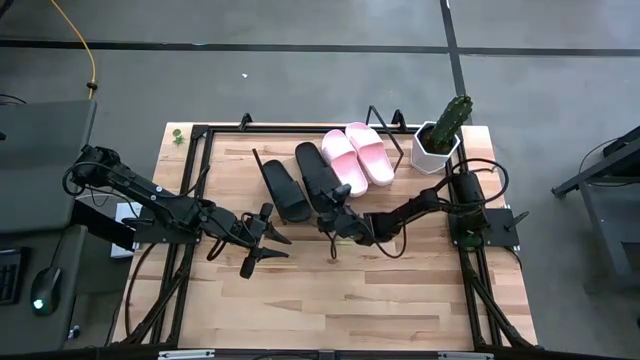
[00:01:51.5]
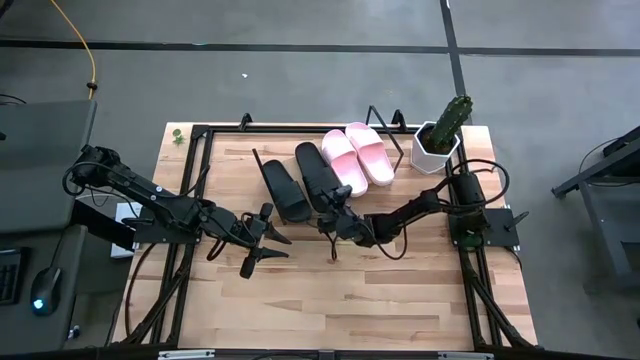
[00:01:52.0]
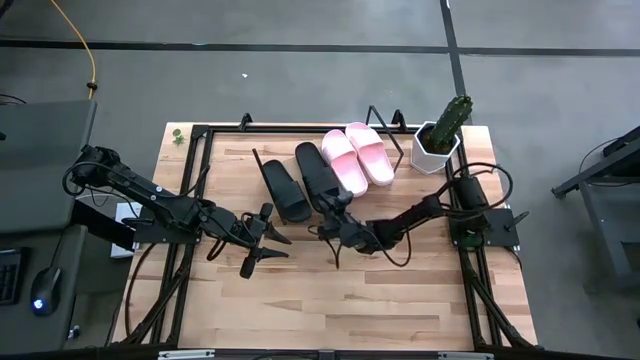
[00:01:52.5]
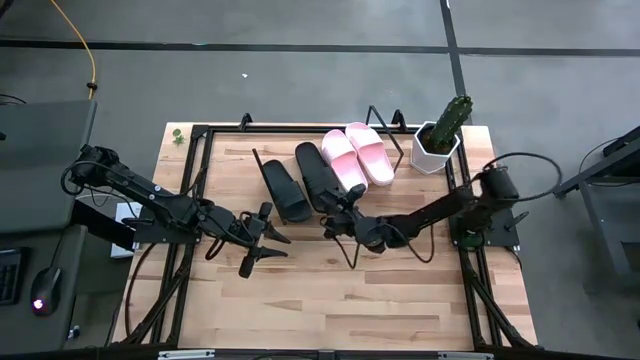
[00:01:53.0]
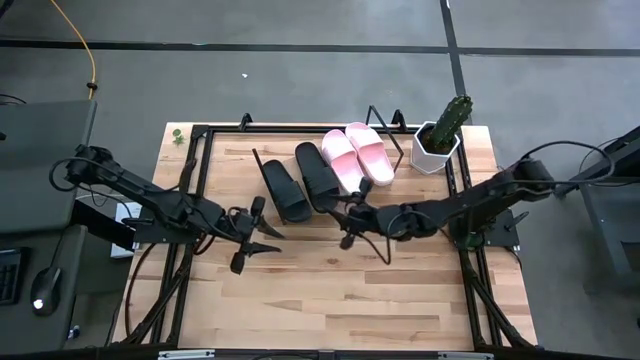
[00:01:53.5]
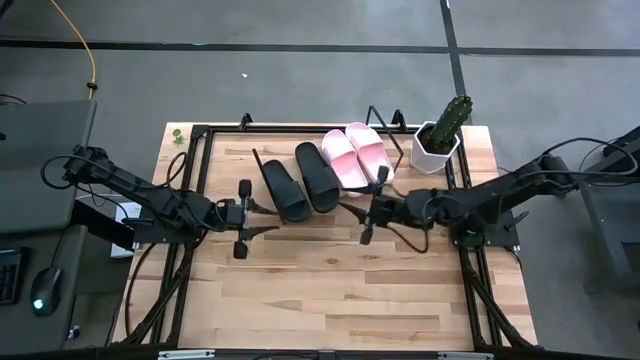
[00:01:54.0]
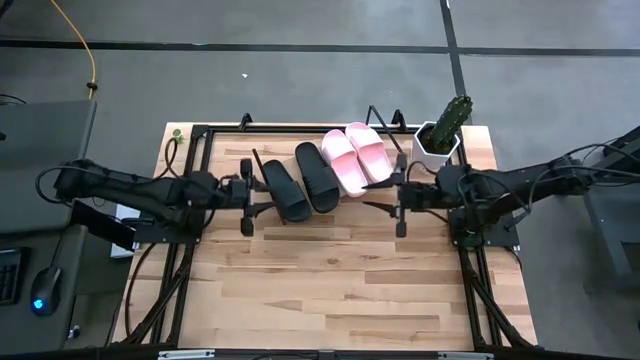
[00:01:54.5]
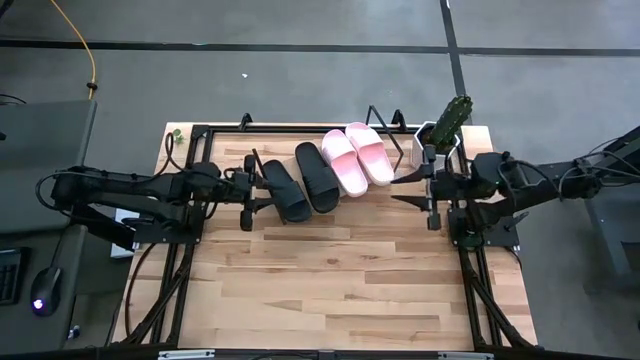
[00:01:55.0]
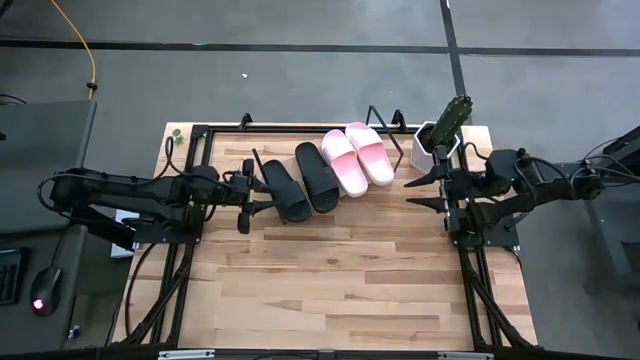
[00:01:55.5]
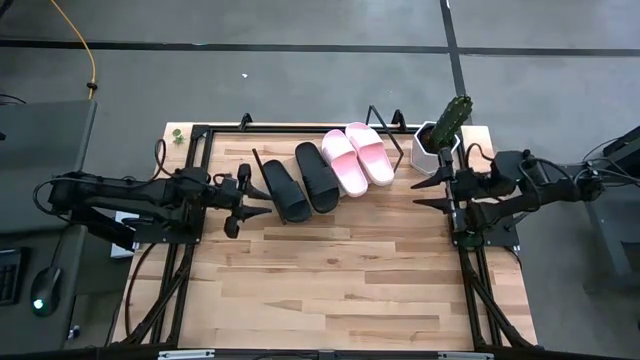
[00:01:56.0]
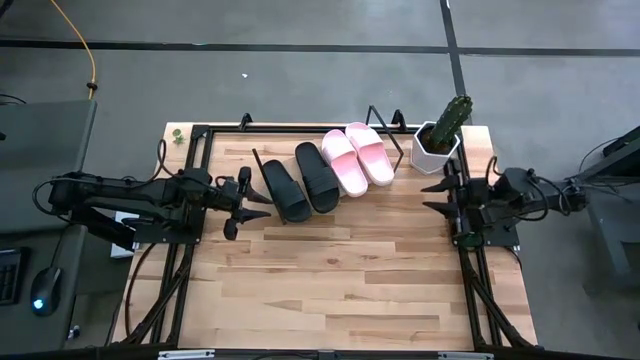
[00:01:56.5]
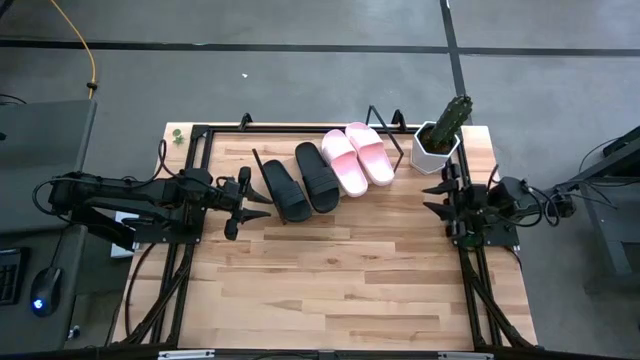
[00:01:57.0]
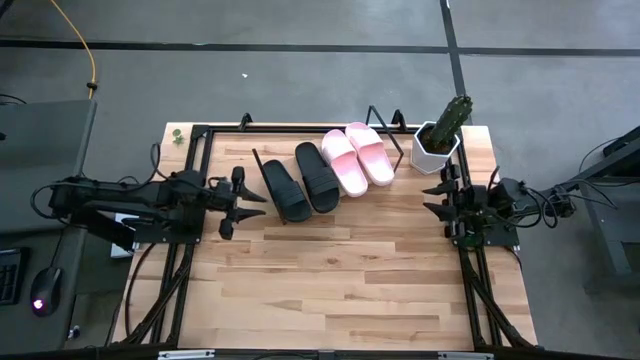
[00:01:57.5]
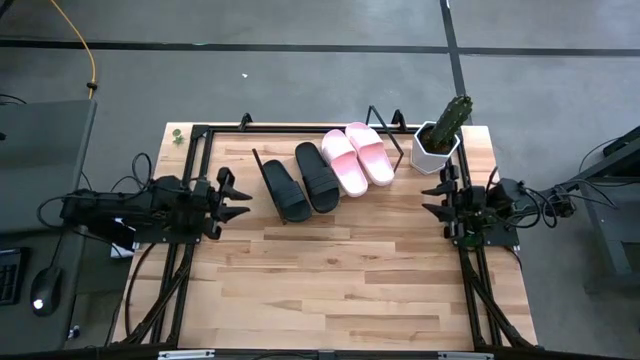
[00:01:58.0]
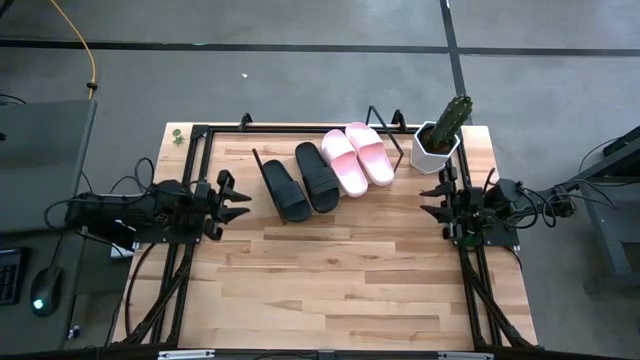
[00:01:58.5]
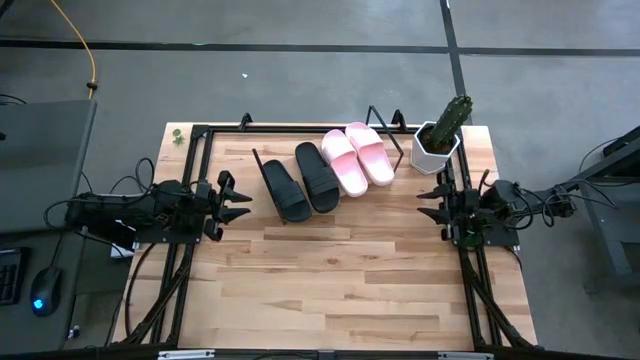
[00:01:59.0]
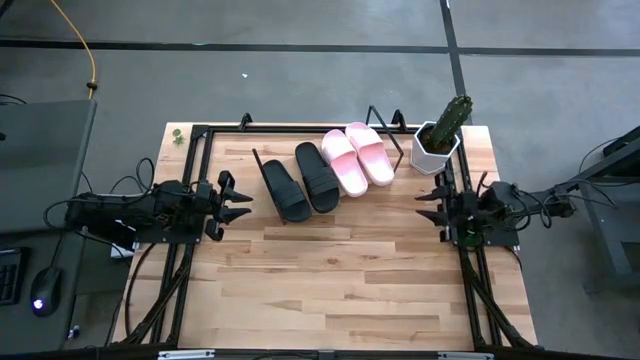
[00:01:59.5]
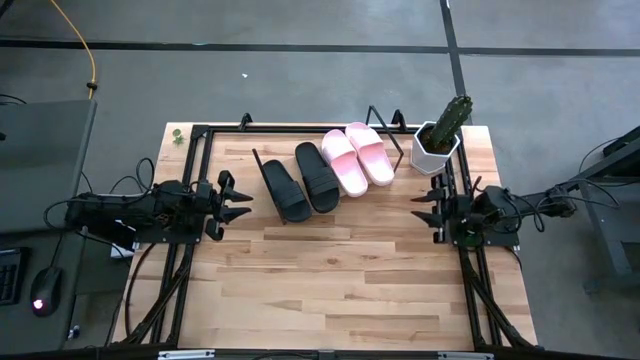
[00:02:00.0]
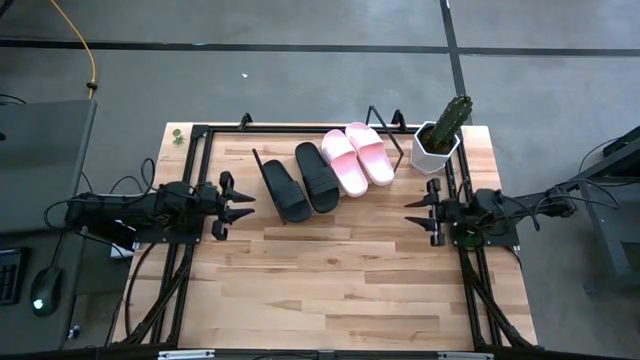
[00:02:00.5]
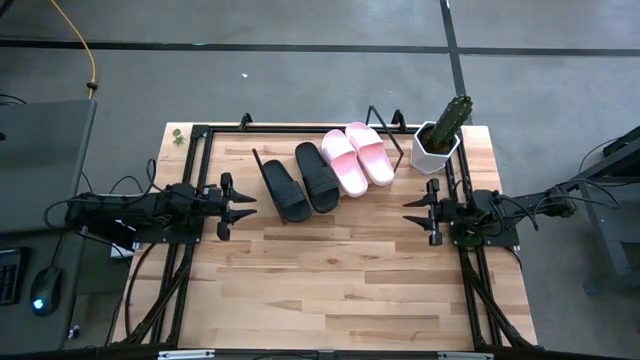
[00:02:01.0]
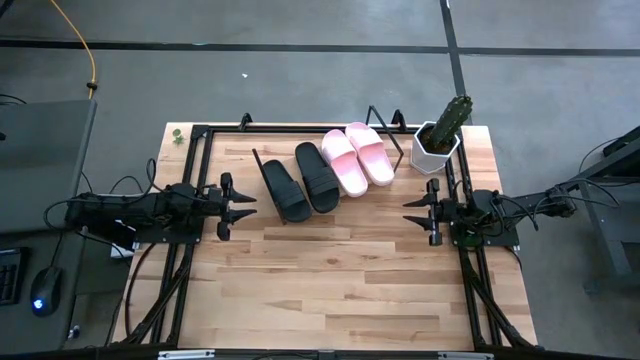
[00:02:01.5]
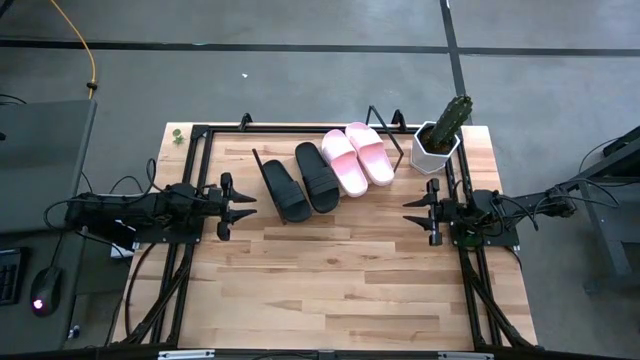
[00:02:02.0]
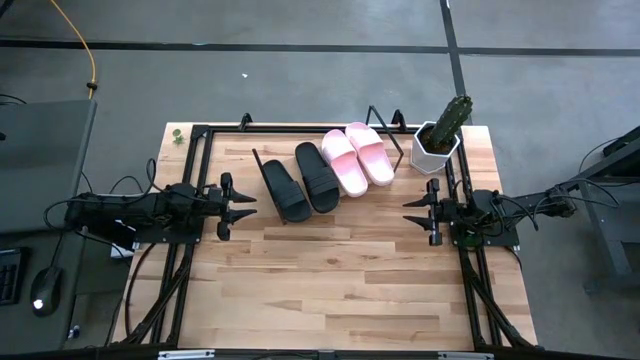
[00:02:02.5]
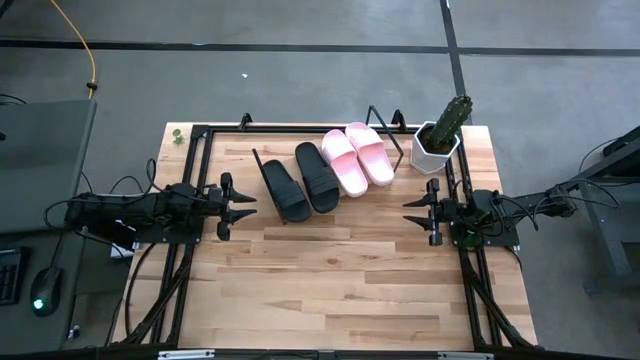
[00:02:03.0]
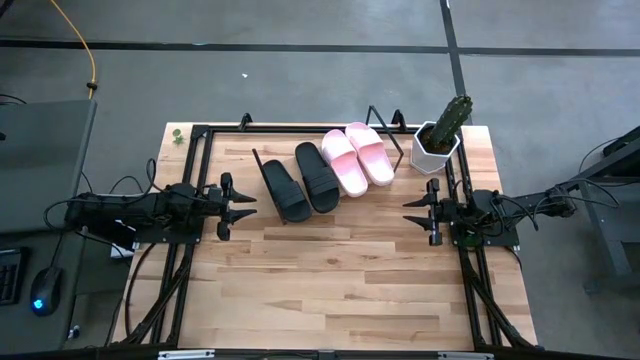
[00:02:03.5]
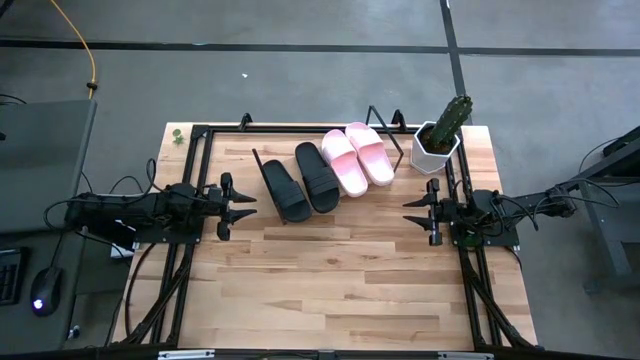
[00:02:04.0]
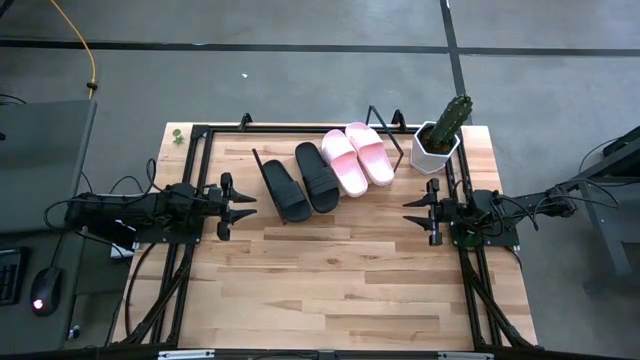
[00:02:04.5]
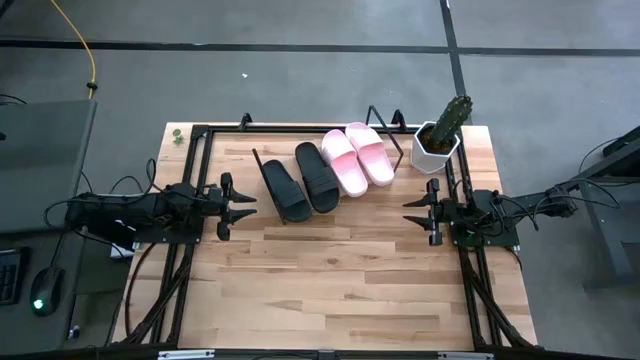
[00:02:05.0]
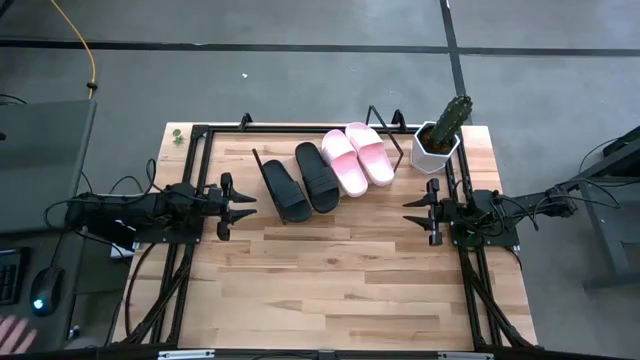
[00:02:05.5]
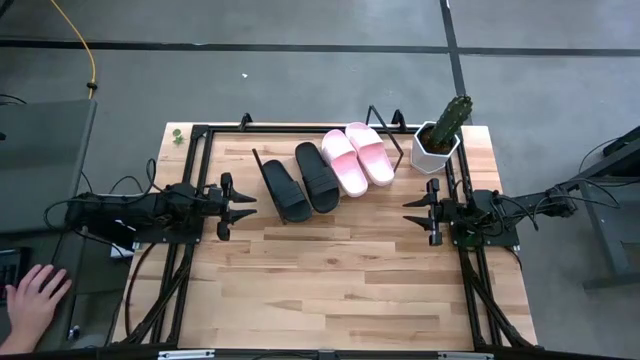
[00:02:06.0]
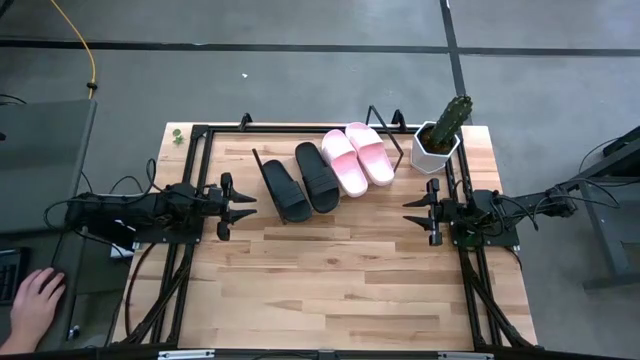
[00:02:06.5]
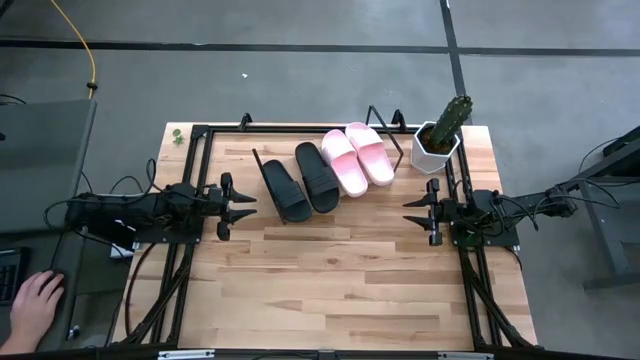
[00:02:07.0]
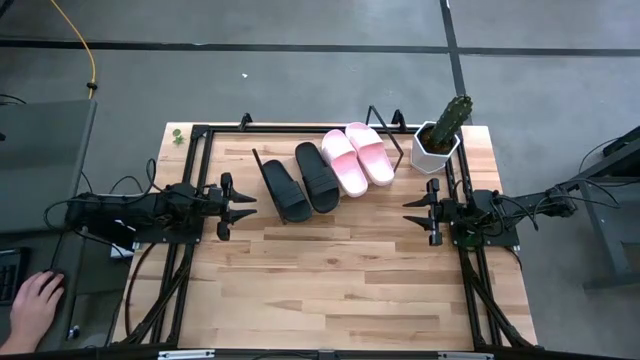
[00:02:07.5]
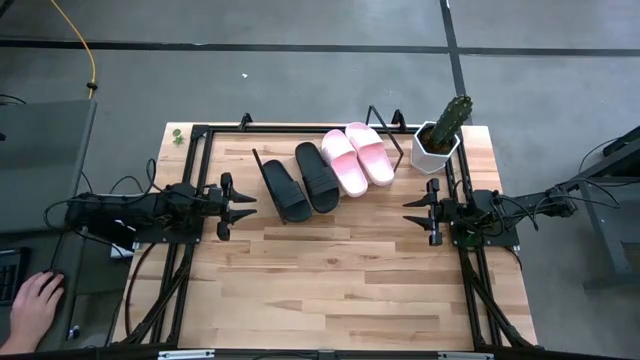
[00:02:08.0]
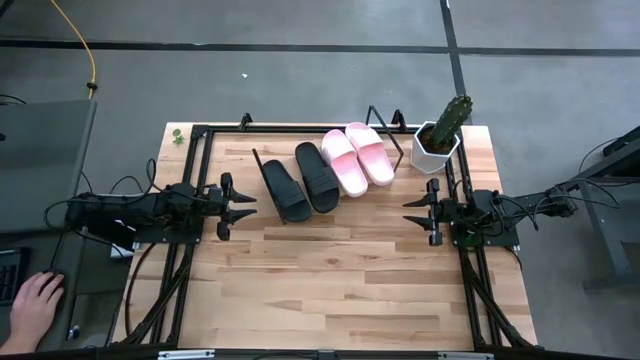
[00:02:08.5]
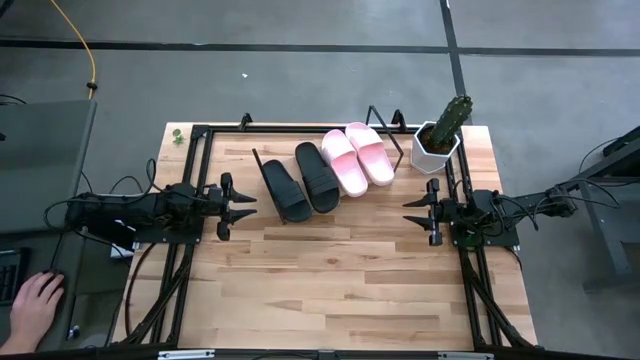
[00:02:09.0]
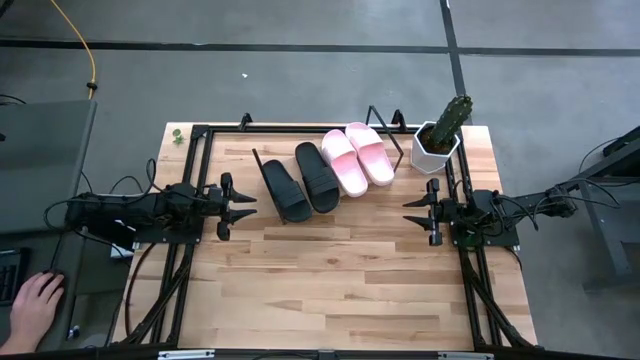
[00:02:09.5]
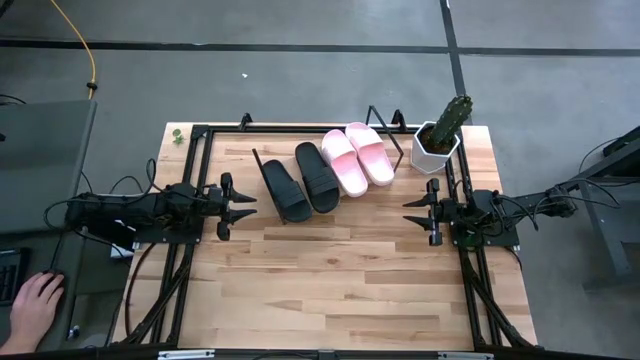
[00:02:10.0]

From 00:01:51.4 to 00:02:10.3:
Task: Pick and place slides into the shelf
Return to Home Position

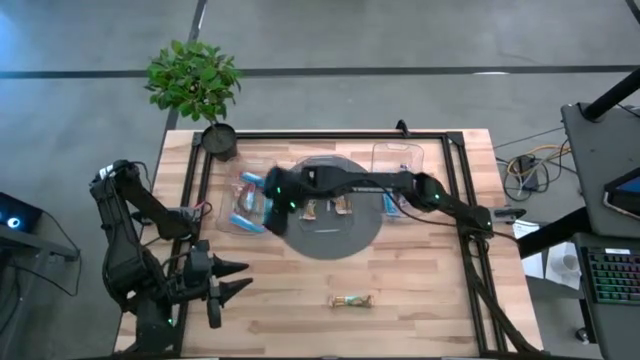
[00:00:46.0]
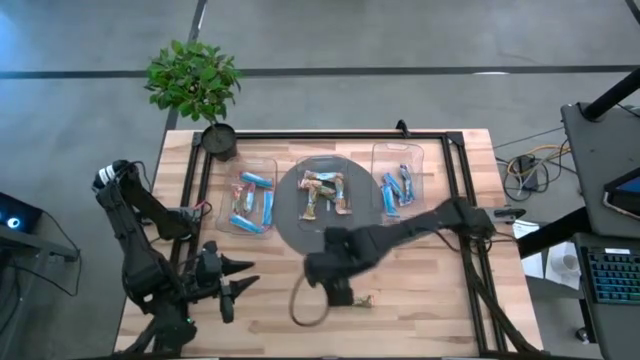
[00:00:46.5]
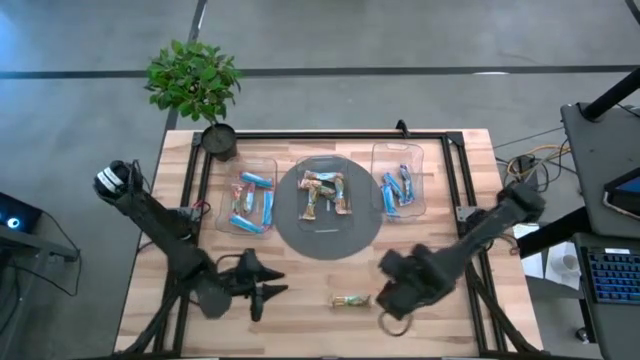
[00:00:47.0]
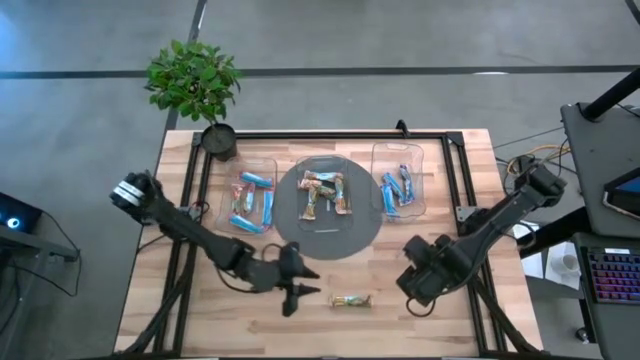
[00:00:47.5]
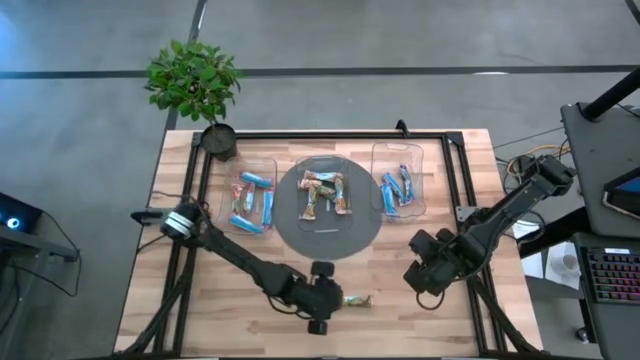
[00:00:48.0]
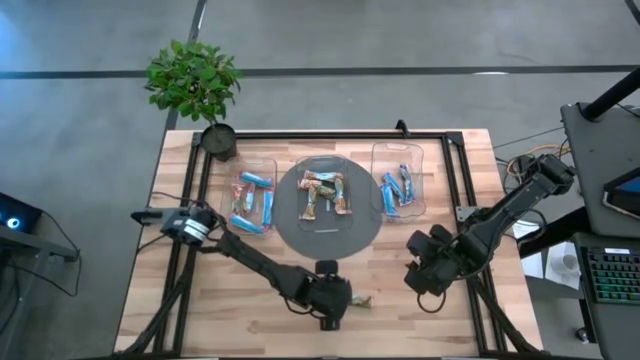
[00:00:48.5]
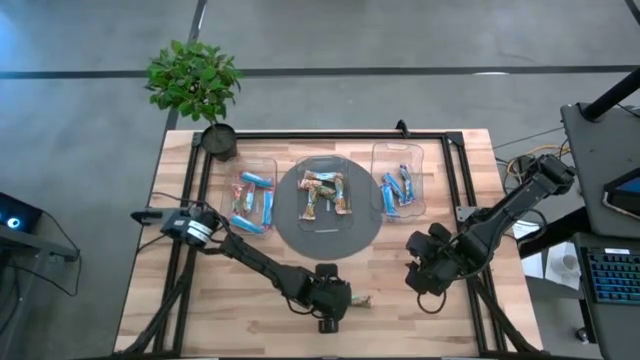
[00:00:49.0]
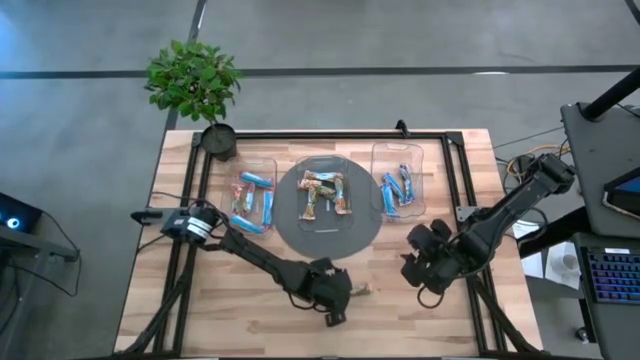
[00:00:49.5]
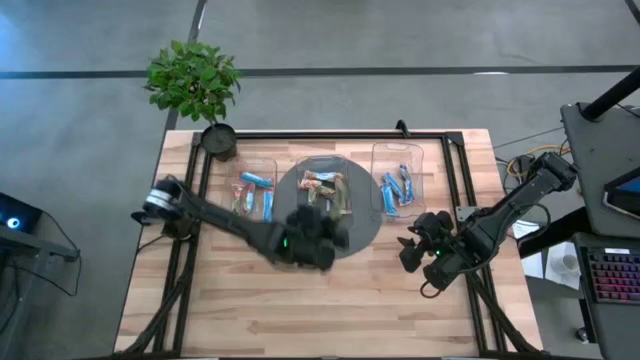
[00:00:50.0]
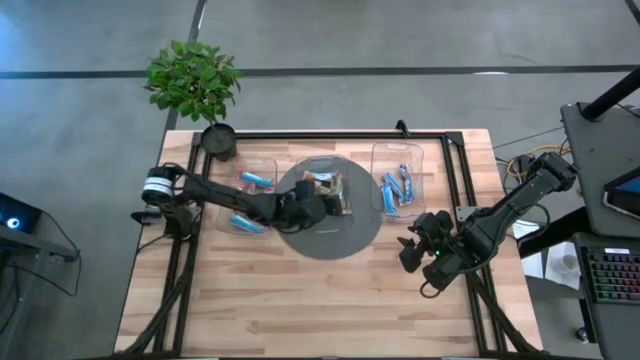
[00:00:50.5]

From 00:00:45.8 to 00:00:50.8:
Task: Pick and place Granola Bars by type
Put the yellow granola bar into the middle transparent bin
